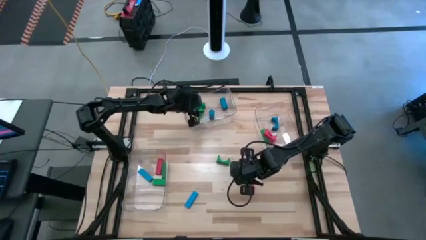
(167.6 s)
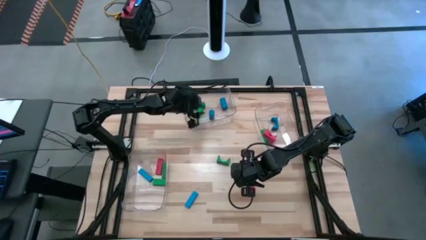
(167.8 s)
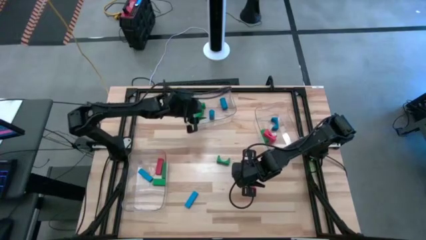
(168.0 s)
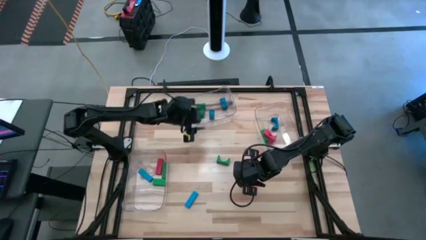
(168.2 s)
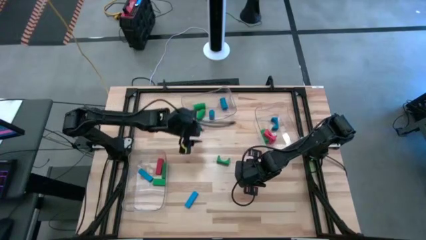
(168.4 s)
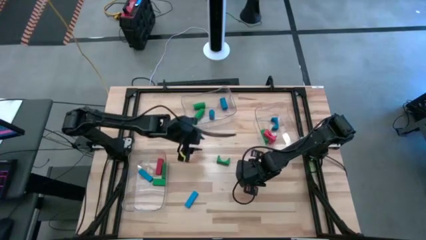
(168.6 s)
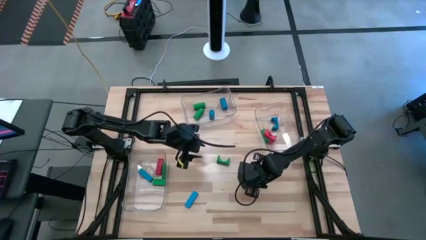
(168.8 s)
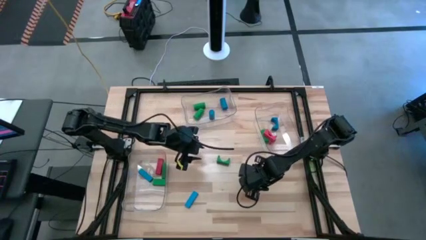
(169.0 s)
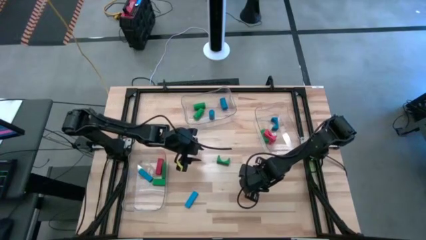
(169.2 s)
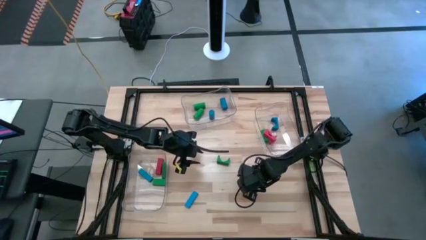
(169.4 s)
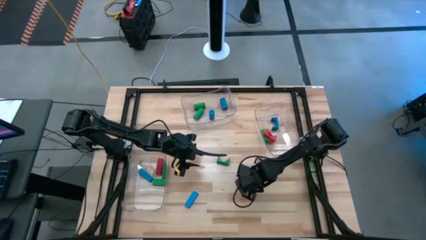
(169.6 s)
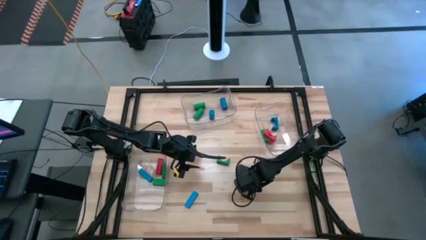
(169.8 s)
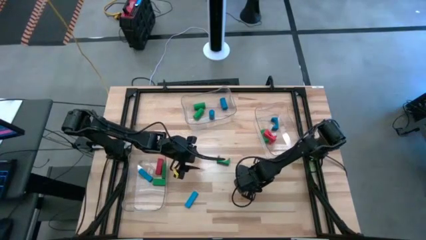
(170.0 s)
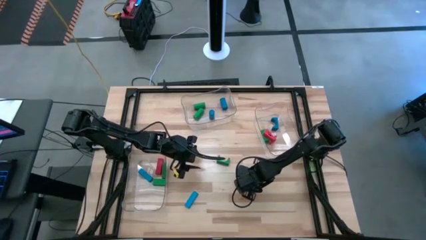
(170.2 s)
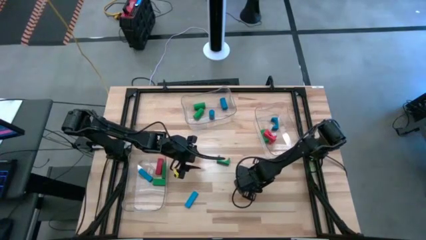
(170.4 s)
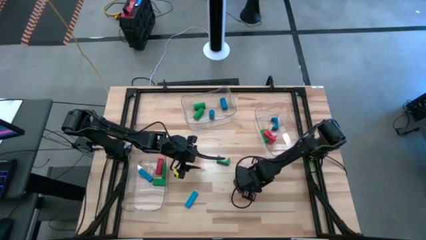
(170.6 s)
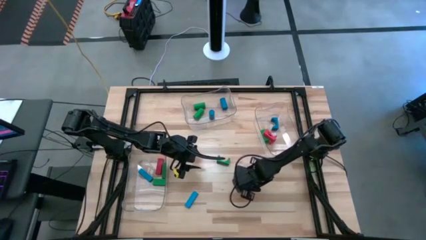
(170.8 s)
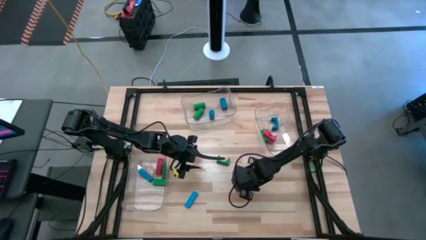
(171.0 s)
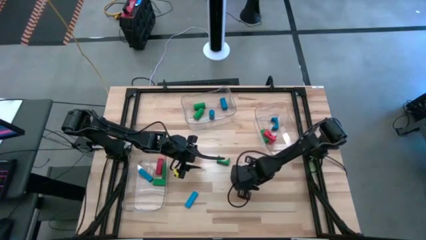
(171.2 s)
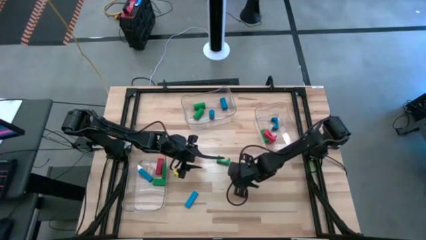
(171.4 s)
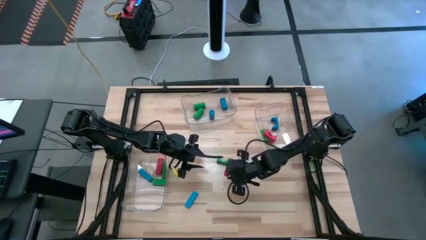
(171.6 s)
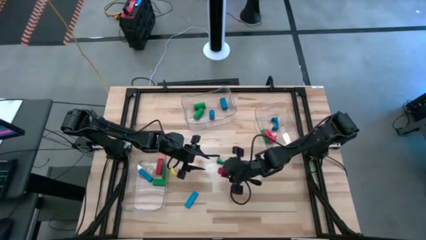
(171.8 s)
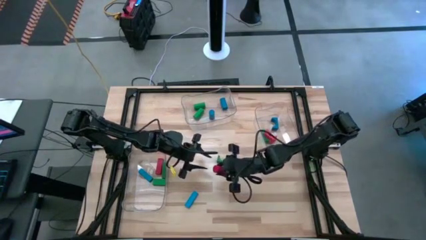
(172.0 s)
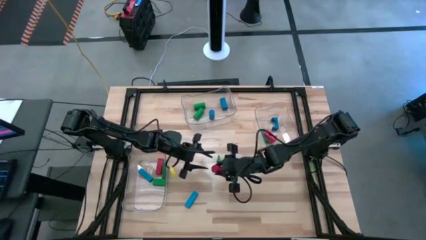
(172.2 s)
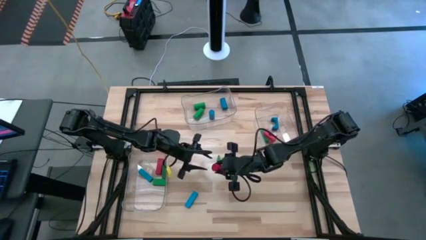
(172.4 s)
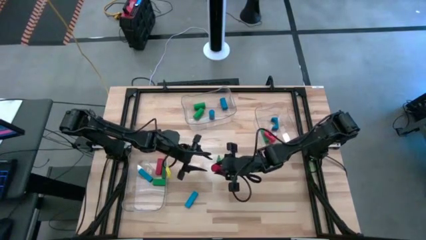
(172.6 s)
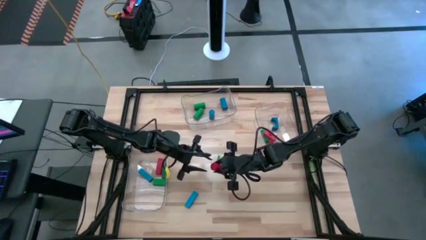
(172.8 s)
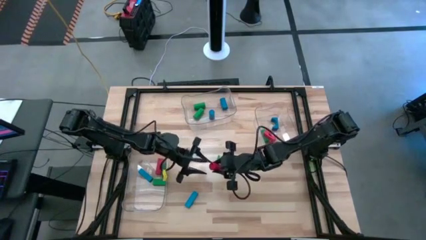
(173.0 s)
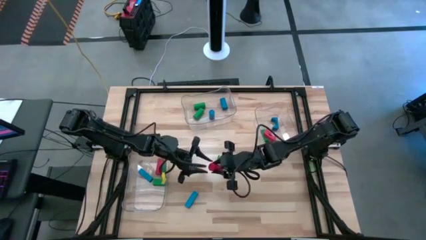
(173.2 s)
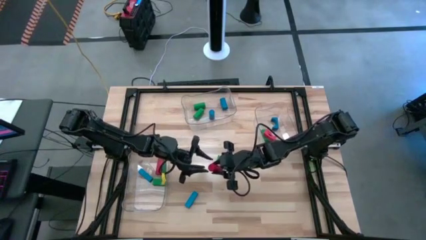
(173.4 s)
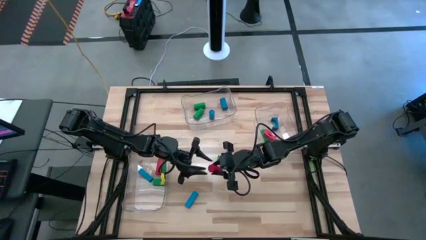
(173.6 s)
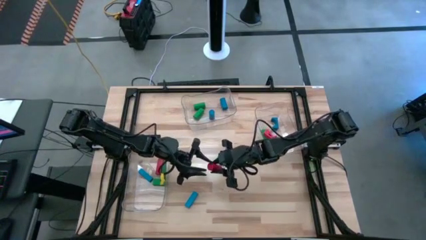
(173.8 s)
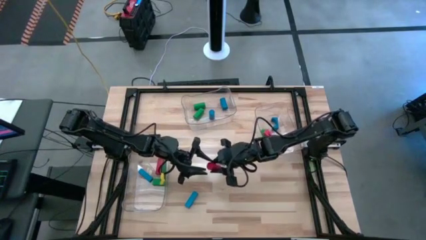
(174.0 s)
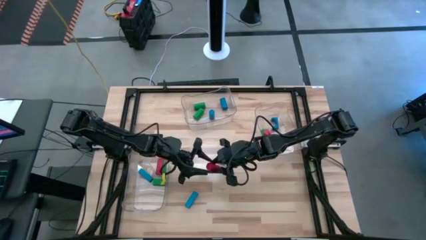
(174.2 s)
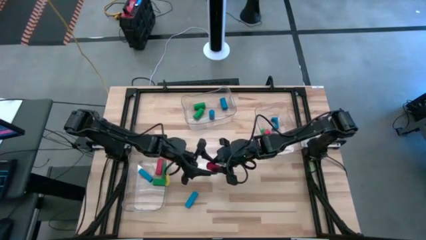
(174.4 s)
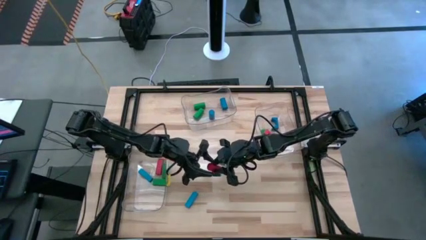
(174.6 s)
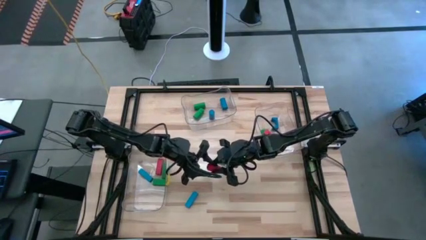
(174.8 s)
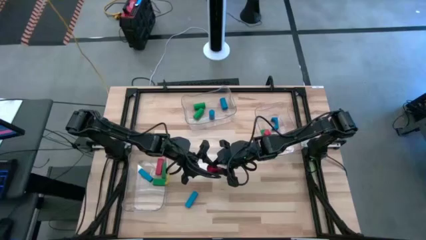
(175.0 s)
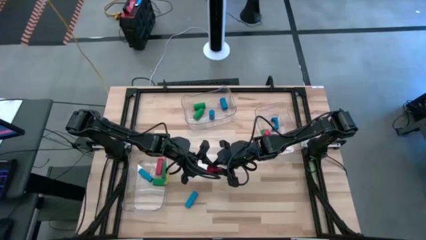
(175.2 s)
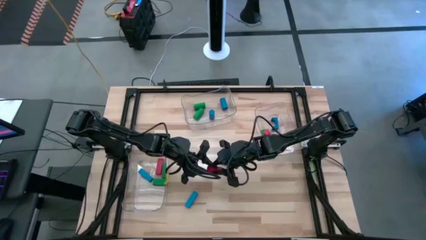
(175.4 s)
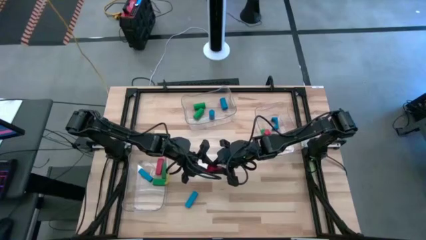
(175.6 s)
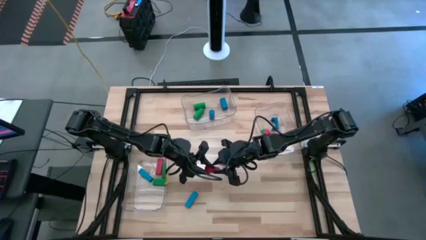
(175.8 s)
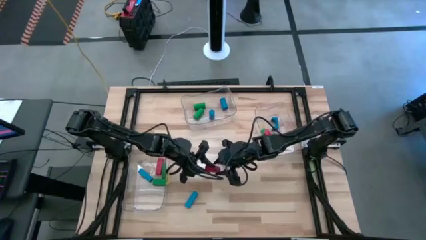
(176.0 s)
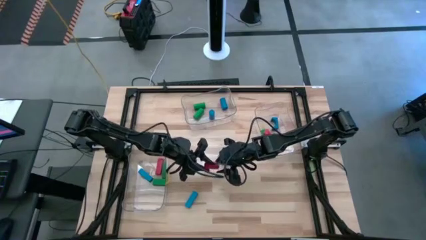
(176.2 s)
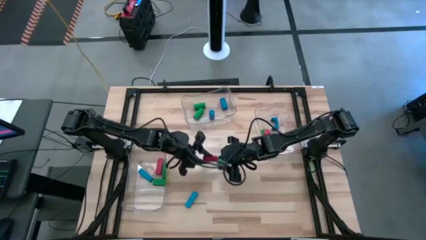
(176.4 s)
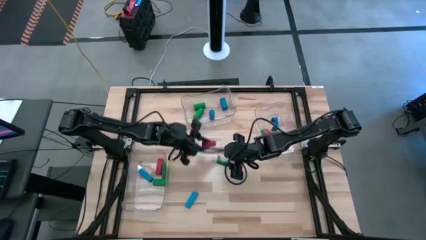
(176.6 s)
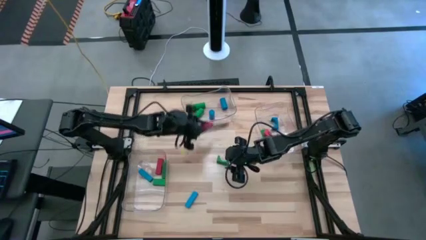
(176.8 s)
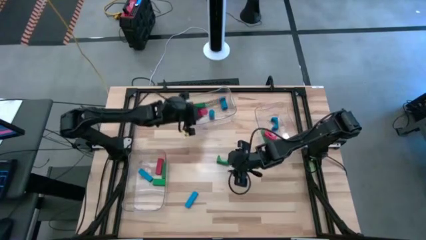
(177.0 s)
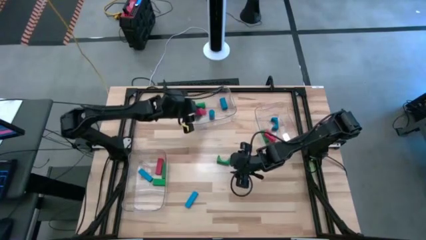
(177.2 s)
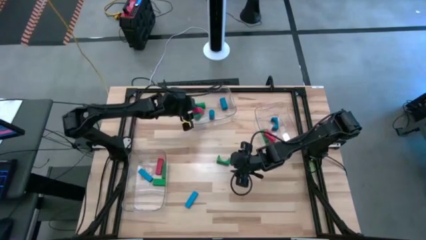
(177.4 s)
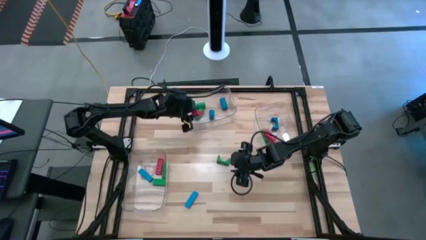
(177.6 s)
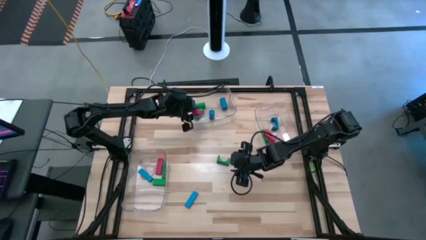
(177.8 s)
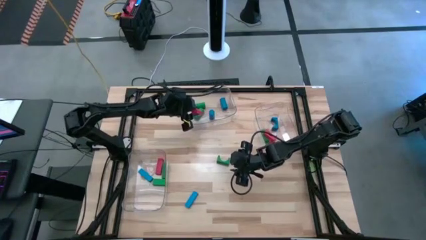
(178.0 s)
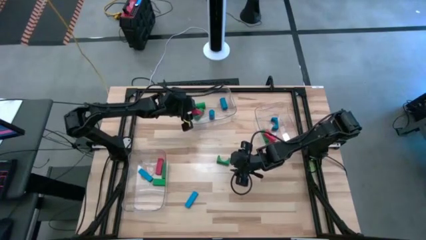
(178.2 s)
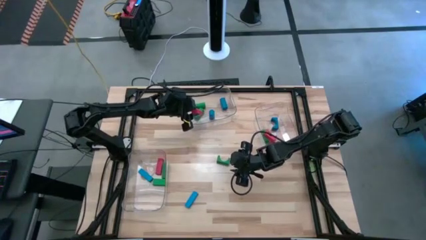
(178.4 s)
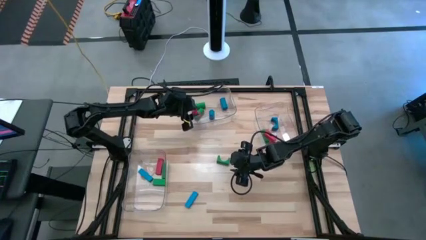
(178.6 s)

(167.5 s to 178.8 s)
Task: Sort blocks by size
Put the red cylinder block into the top transparent bin

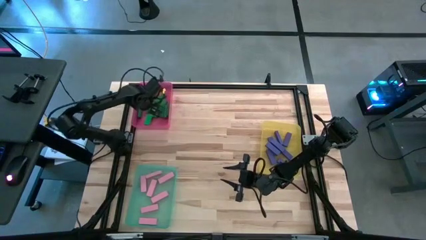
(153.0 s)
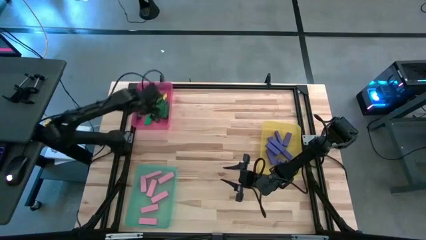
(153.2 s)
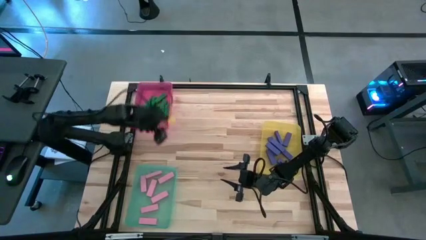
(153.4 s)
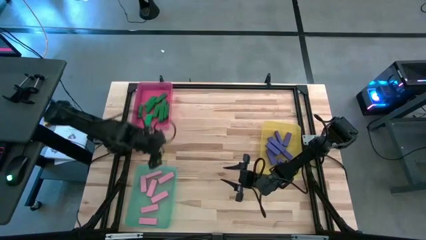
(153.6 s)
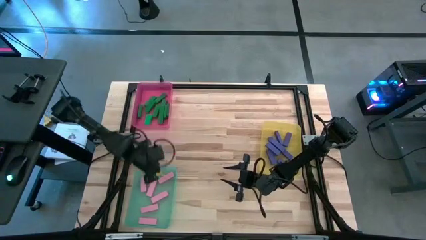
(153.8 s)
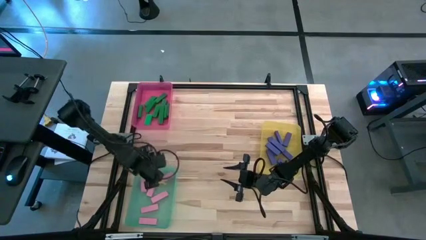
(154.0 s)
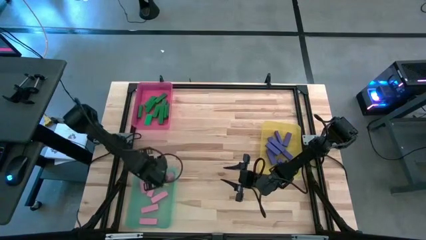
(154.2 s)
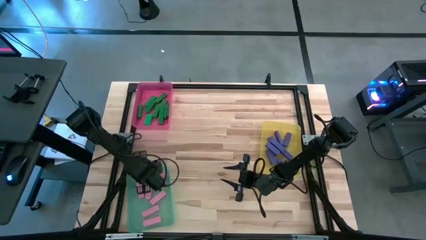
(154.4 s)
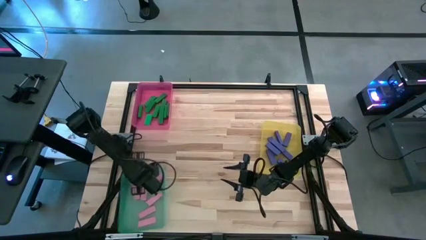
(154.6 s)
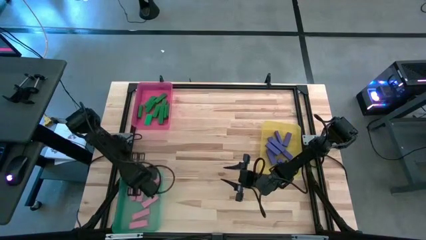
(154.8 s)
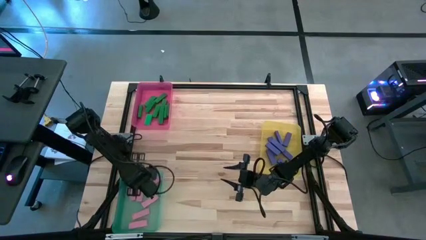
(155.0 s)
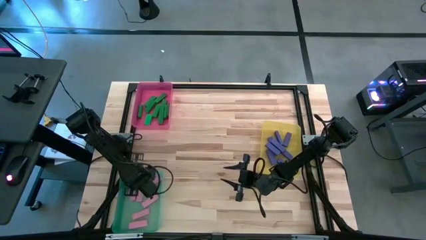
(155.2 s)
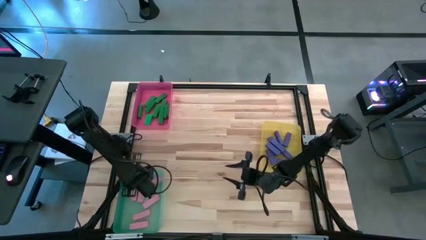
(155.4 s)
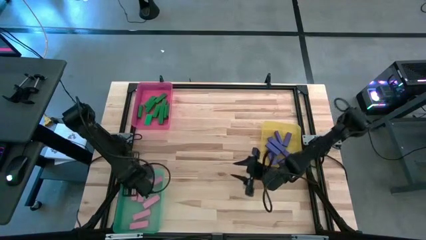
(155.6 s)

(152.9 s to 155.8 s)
Task: Sort blocks
Adjust the green bin

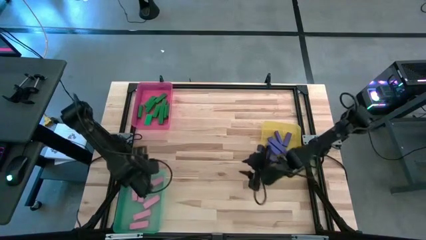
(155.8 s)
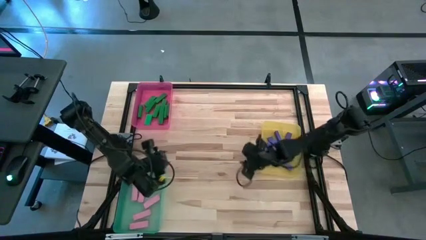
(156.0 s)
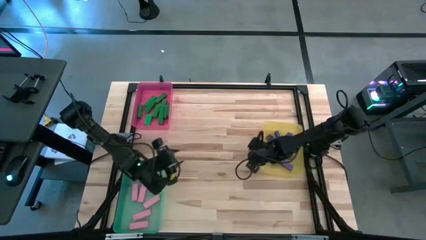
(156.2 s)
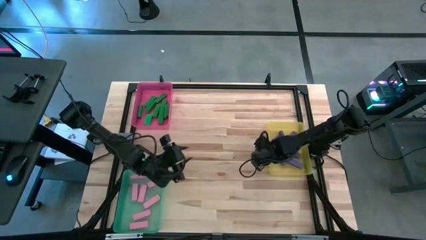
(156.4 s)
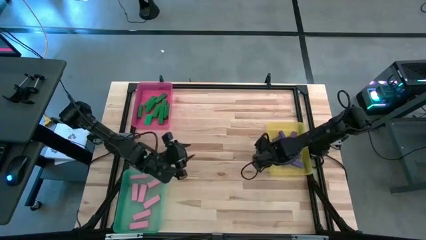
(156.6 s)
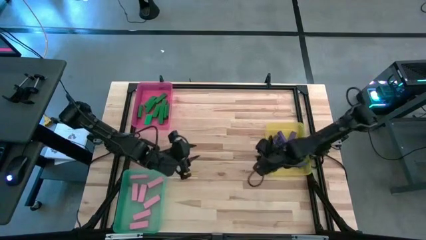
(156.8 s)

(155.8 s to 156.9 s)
Adjust the yellow bin
